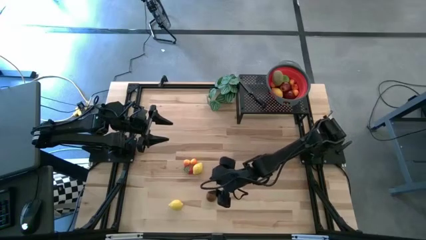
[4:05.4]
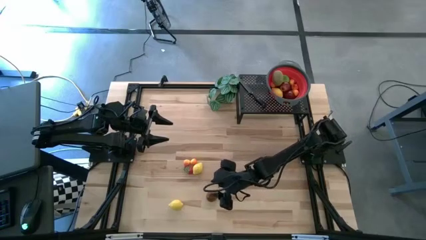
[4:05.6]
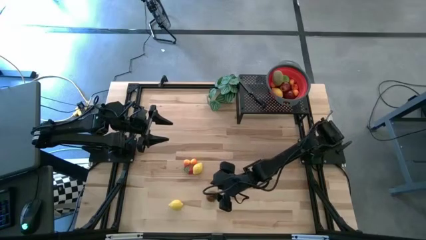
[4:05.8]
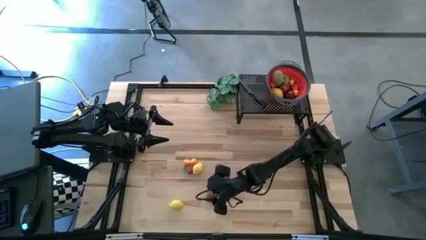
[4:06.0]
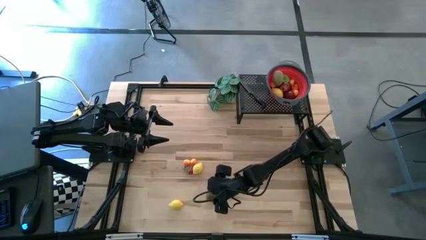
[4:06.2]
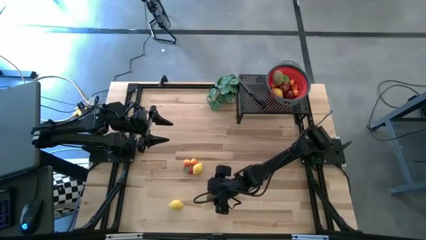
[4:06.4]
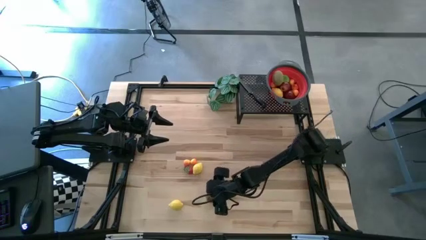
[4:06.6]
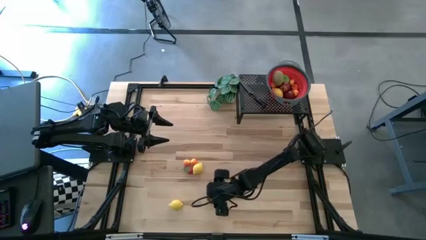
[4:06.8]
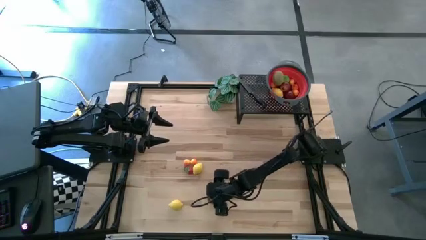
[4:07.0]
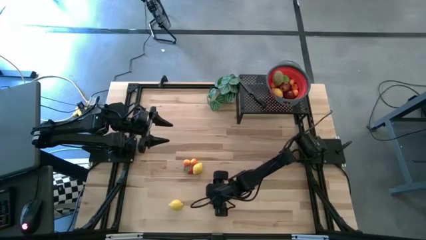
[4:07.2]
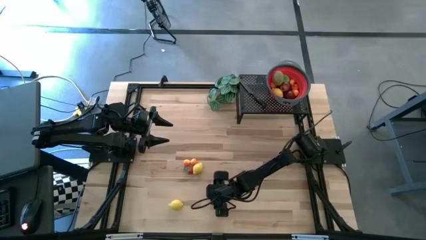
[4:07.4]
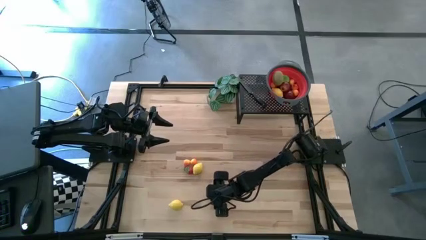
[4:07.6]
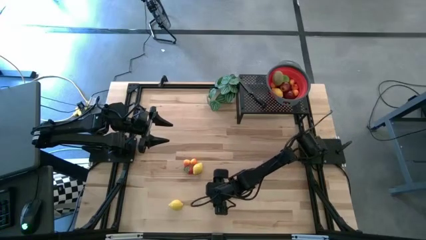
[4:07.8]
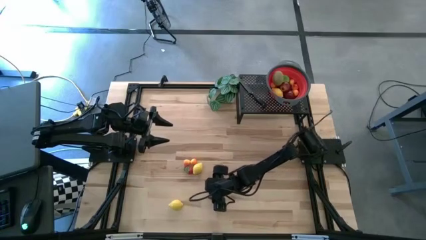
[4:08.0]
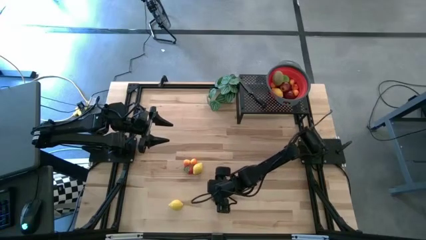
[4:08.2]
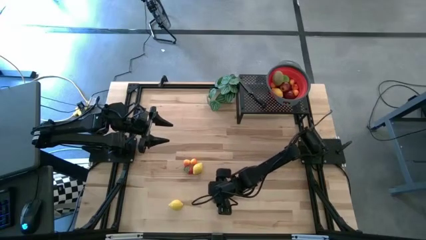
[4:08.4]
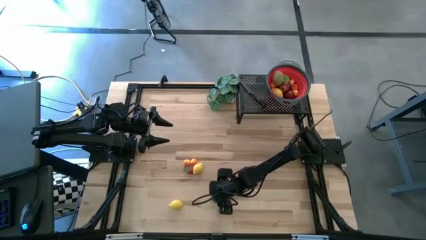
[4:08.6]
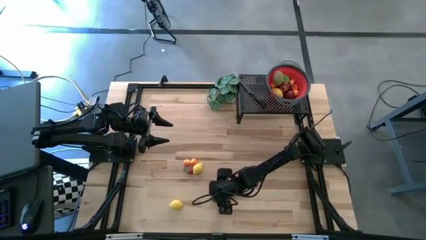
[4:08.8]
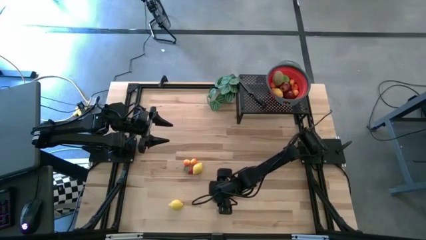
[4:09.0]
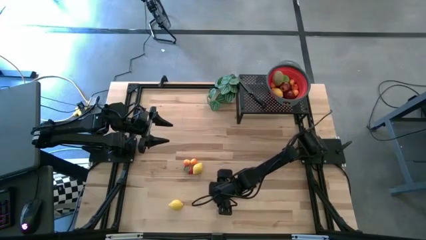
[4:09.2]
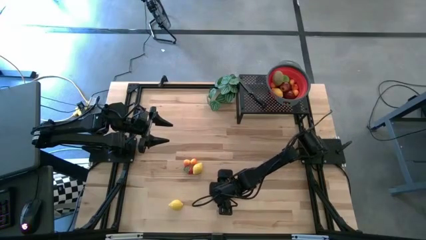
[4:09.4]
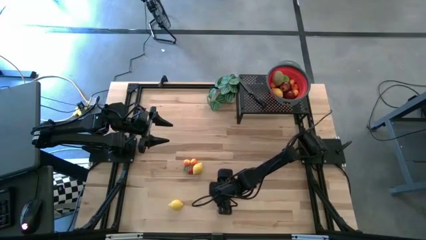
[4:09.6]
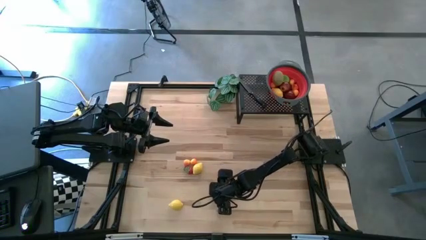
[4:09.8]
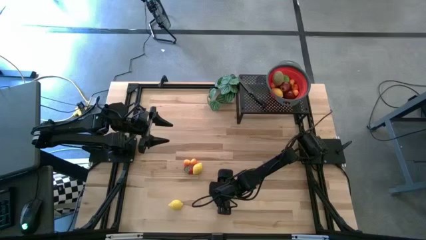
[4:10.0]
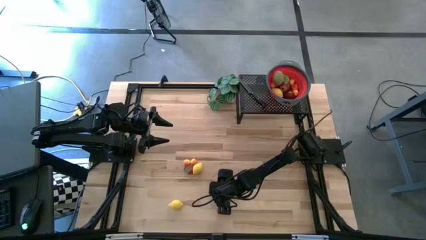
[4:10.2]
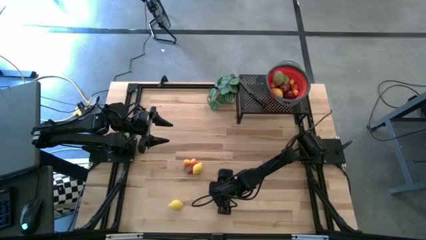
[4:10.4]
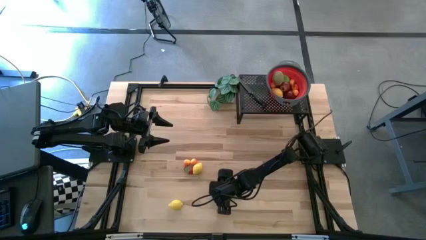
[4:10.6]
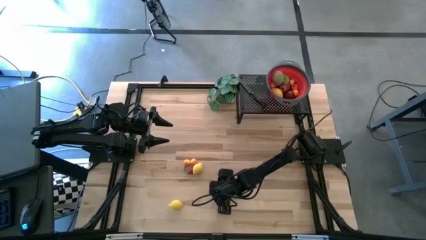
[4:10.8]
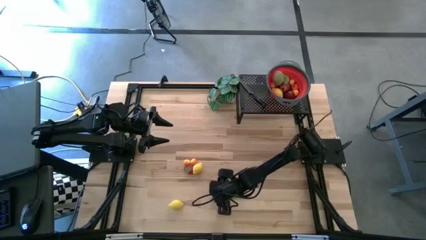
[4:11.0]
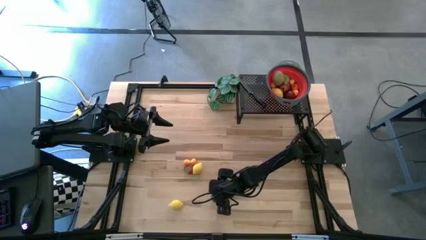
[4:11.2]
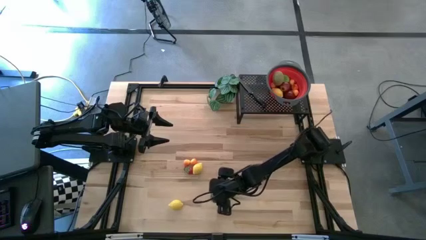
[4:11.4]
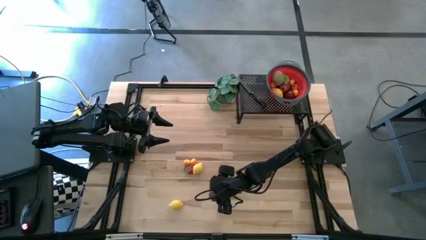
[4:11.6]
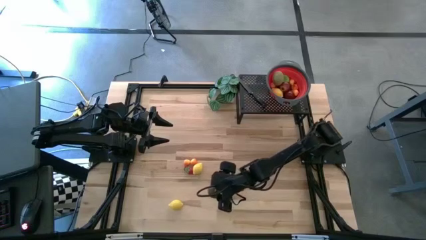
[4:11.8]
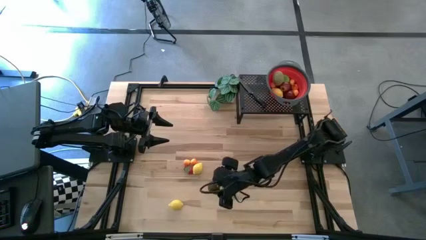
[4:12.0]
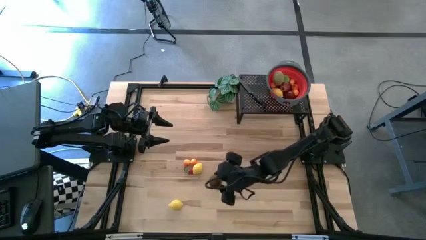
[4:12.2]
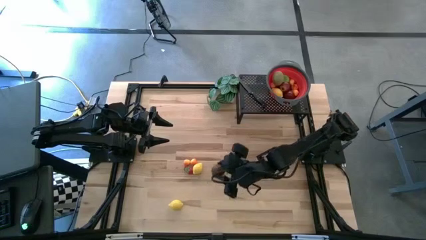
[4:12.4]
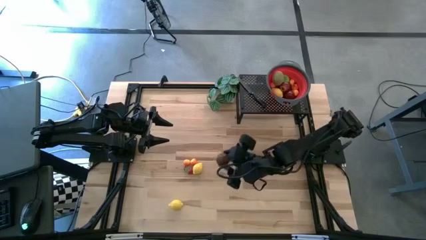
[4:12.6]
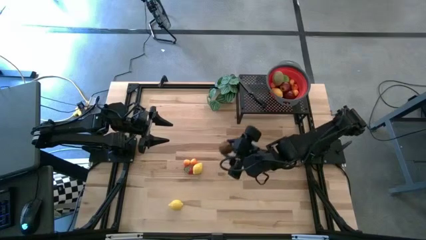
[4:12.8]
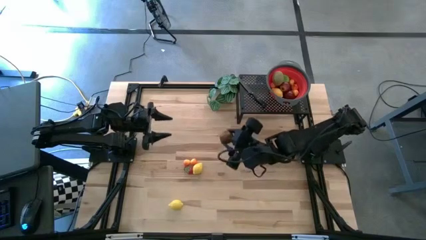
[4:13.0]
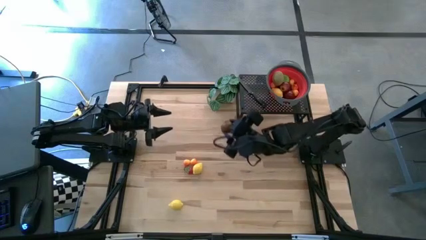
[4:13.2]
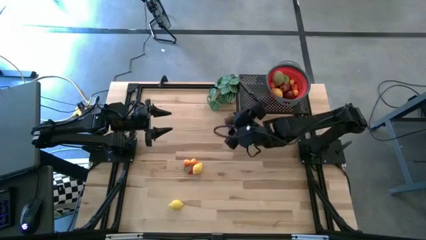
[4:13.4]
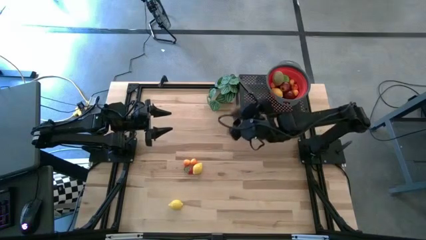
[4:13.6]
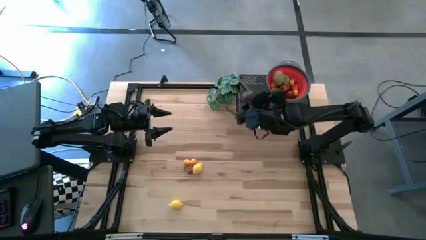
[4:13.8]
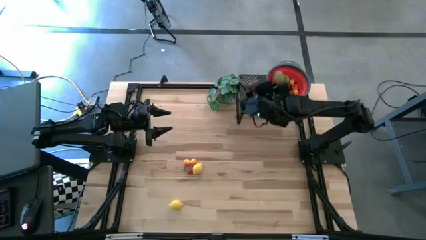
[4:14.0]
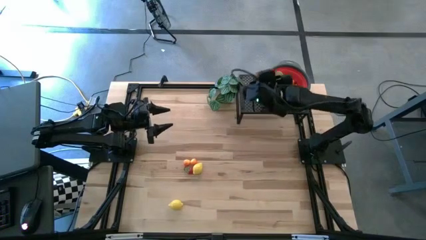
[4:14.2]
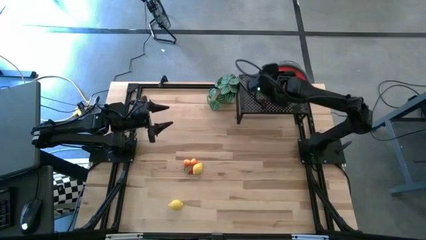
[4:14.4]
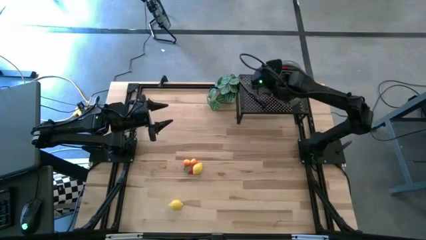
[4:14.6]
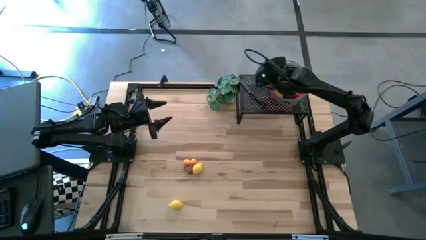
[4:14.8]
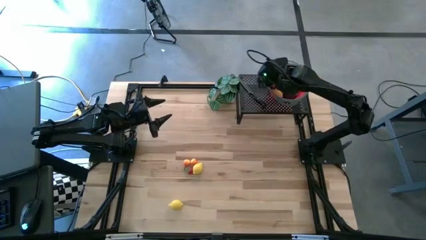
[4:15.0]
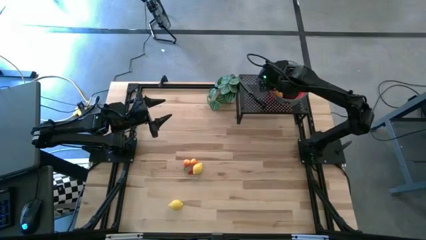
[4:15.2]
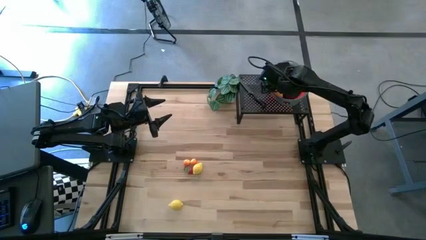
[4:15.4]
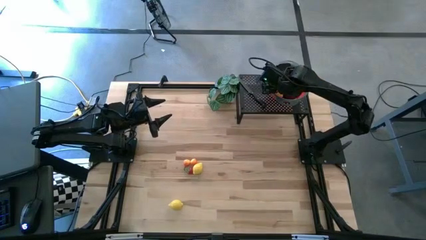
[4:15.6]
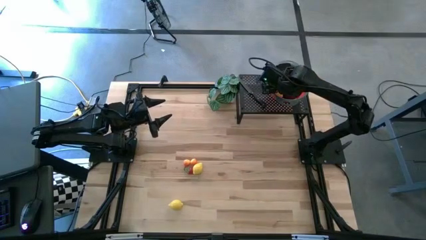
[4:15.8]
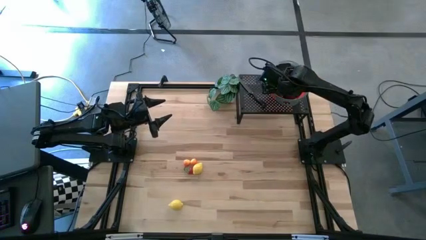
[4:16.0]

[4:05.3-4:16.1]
Task: Pick & Place Fruit
Put the half brown kiwi into the red strainer bowl

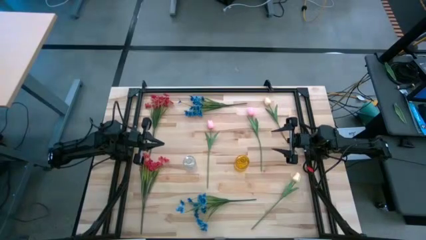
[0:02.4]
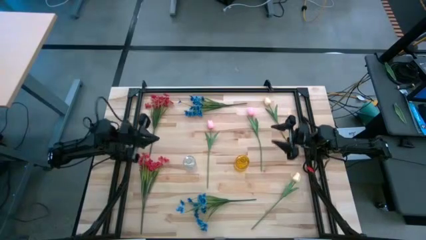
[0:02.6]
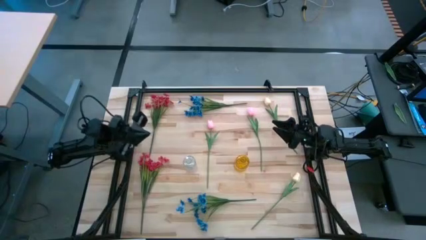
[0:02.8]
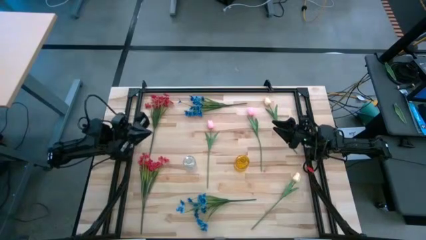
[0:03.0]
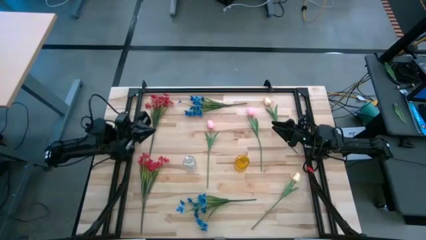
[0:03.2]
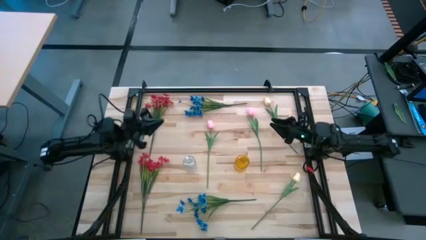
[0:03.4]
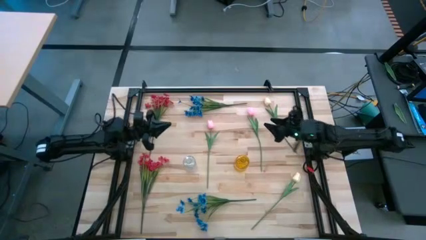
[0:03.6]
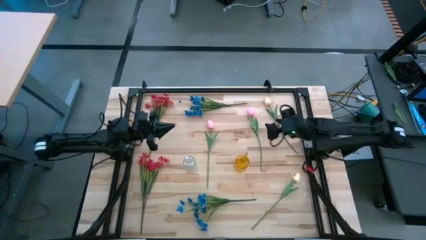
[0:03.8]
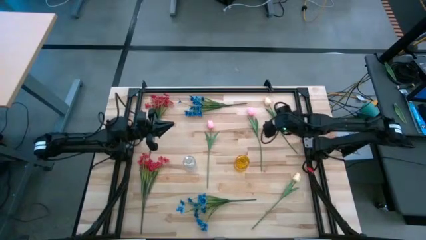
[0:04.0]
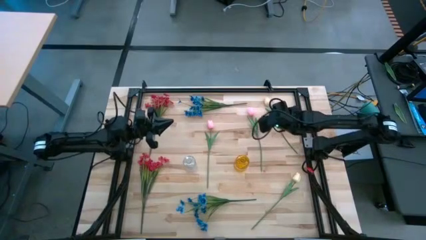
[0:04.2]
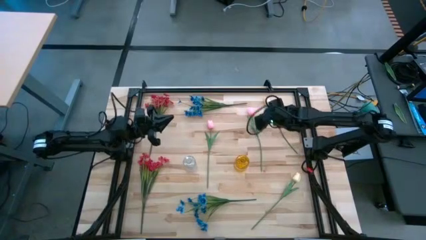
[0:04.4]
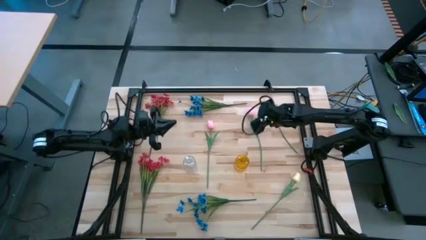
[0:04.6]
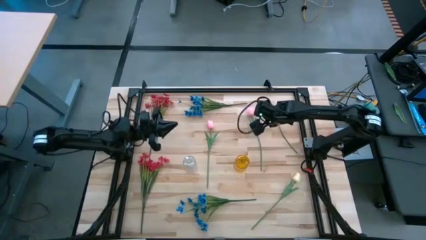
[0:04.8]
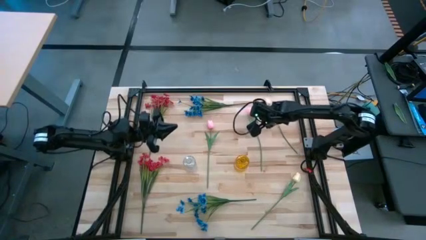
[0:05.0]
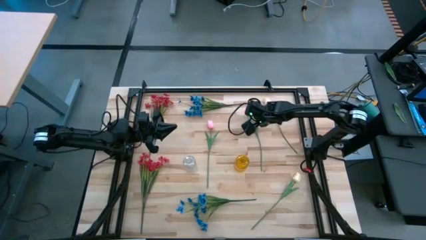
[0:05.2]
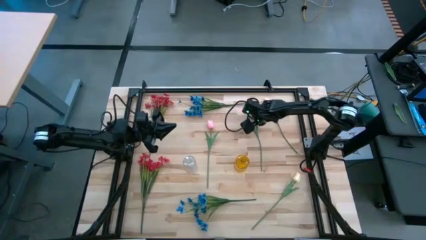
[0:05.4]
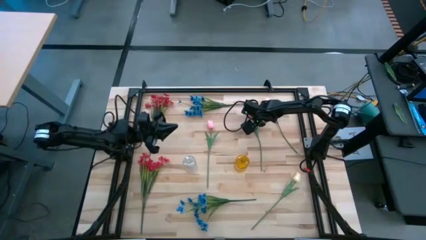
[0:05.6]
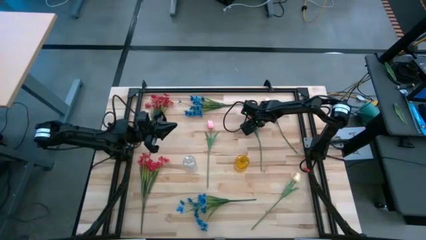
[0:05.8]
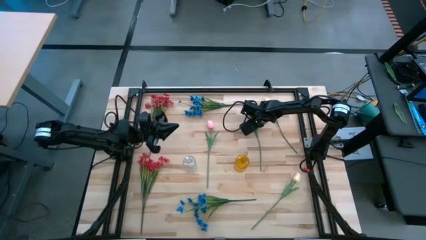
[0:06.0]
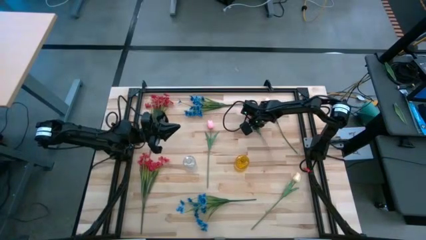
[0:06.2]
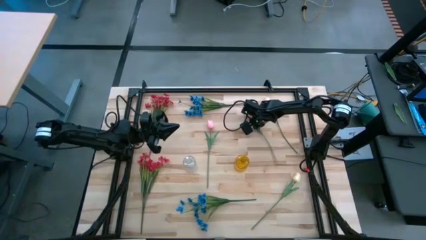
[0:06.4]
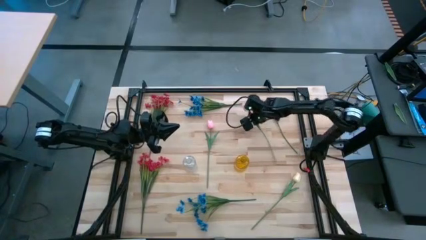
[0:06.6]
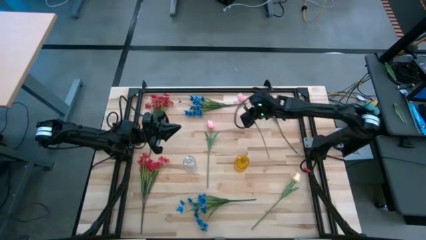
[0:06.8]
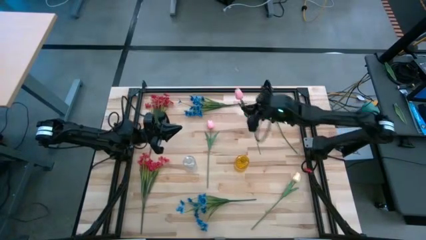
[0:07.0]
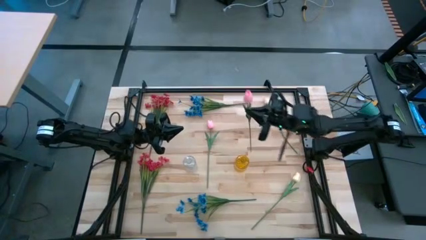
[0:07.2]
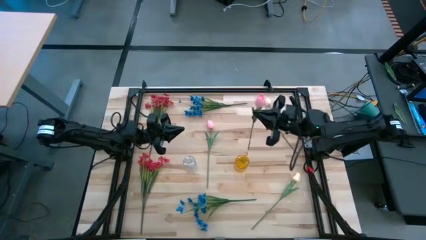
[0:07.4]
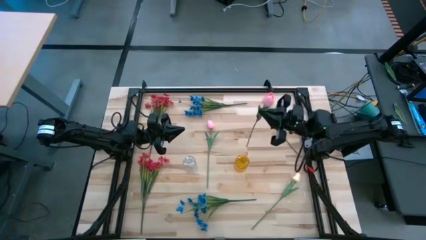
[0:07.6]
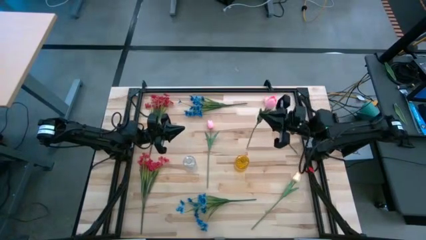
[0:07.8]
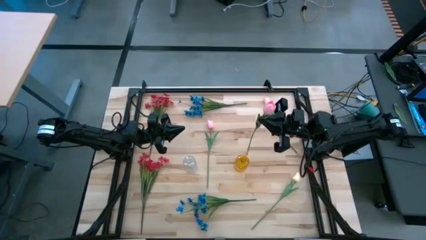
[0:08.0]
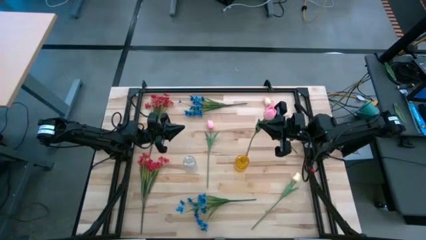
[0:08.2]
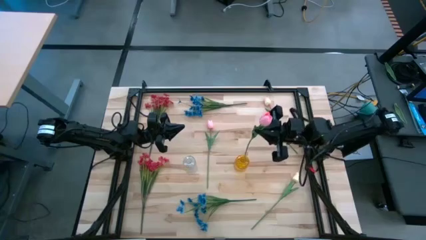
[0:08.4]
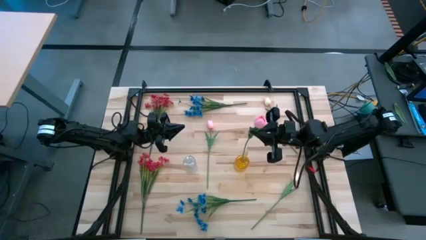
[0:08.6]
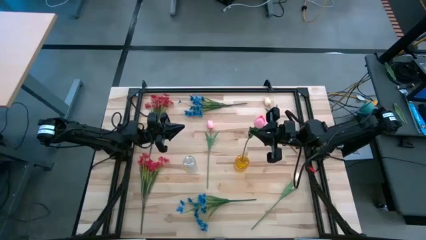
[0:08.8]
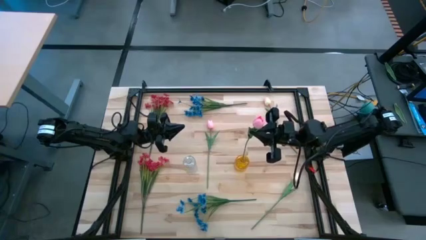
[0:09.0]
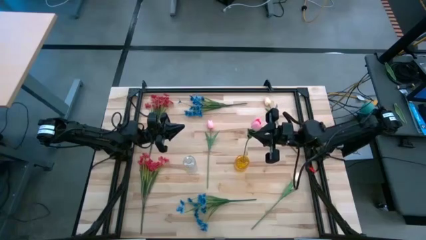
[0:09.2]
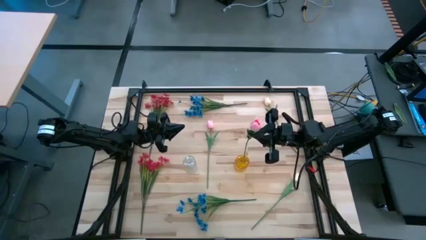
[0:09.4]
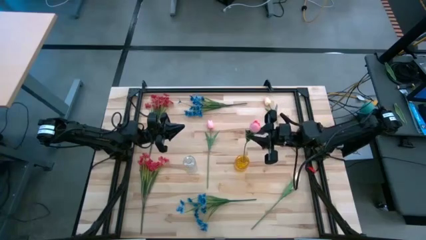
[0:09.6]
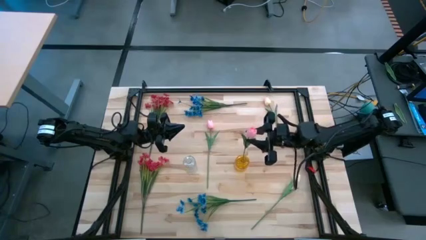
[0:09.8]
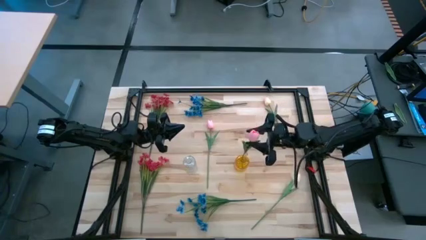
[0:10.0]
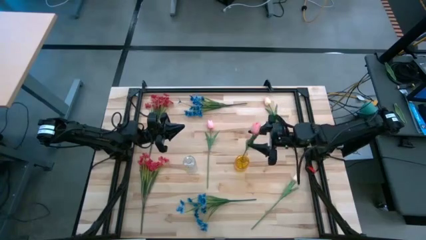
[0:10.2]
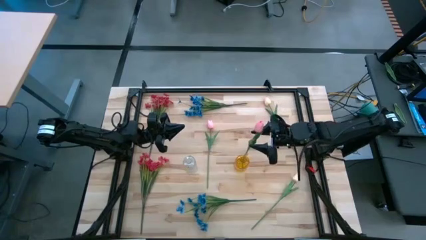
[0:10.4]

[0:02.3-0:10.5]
Task: Sort flowers into vase by color
Put the right pink flower into the yellow vase
